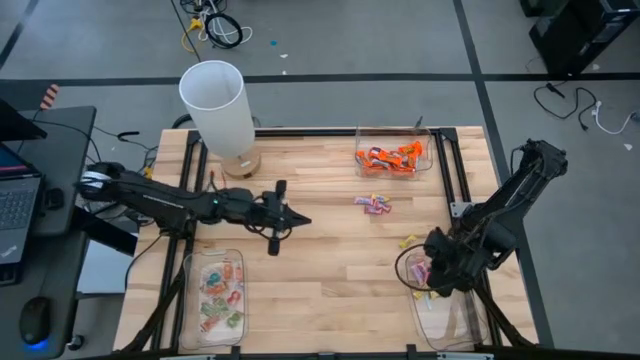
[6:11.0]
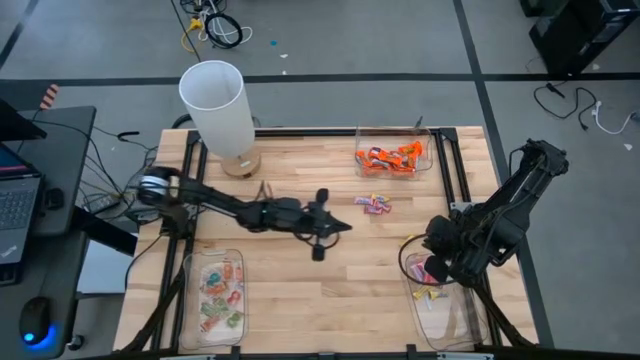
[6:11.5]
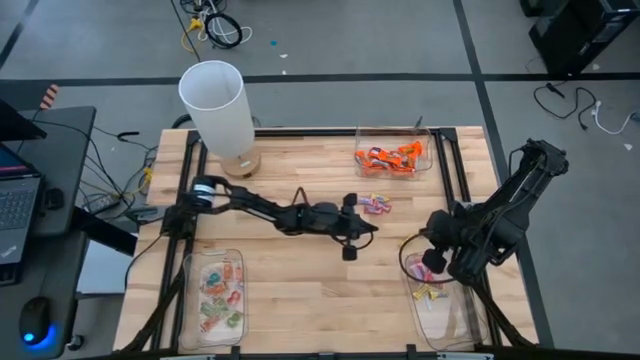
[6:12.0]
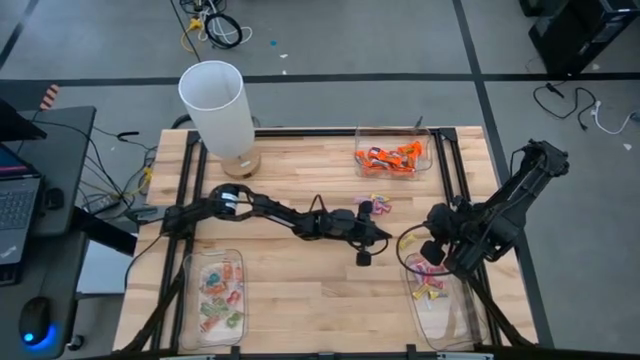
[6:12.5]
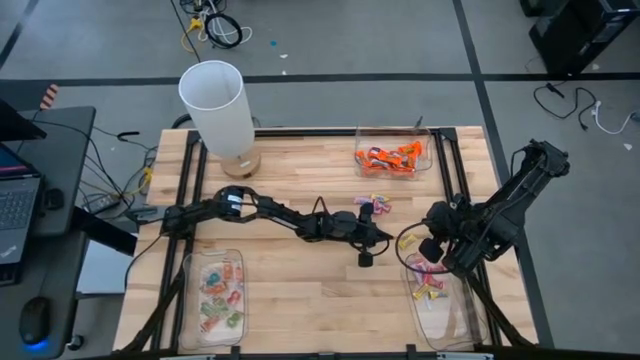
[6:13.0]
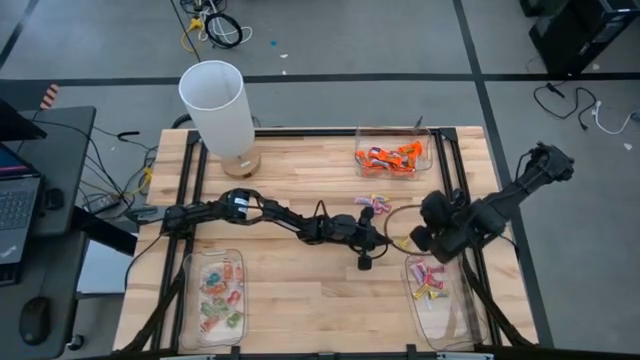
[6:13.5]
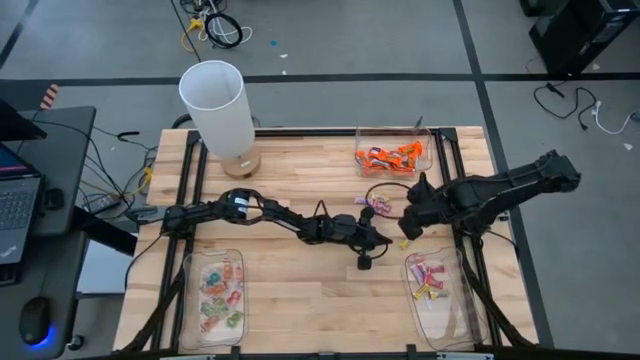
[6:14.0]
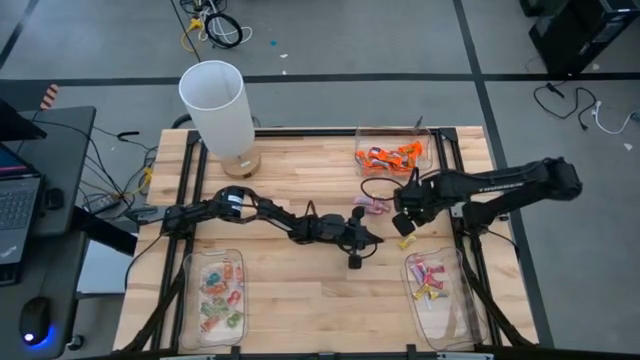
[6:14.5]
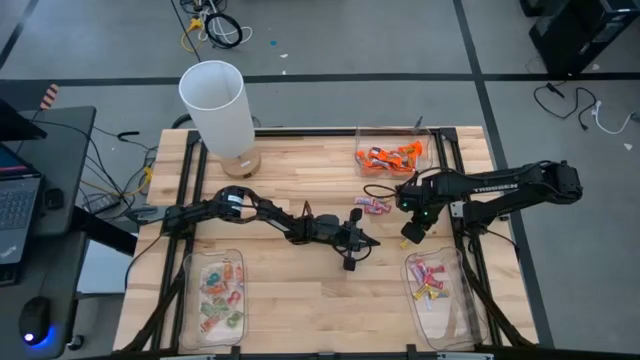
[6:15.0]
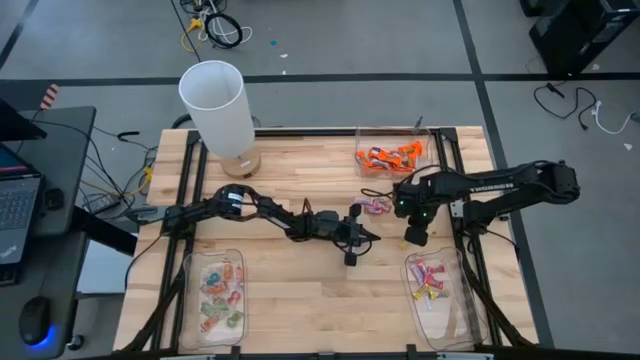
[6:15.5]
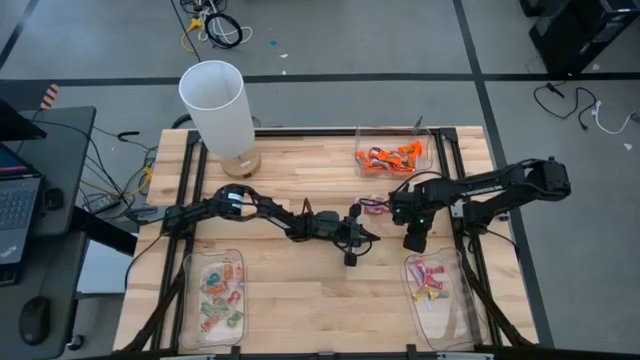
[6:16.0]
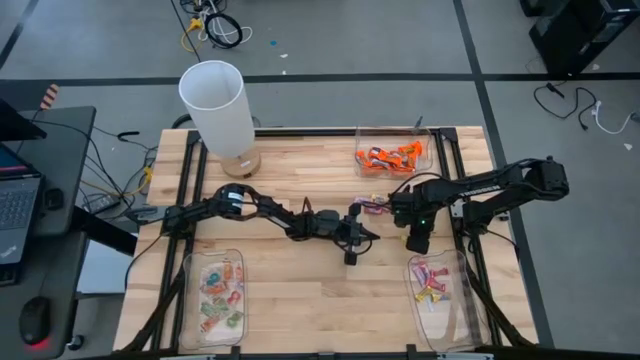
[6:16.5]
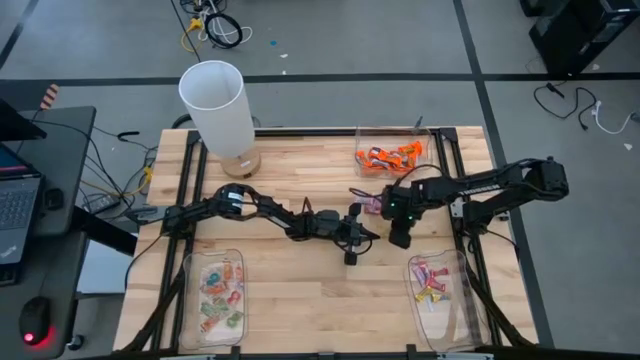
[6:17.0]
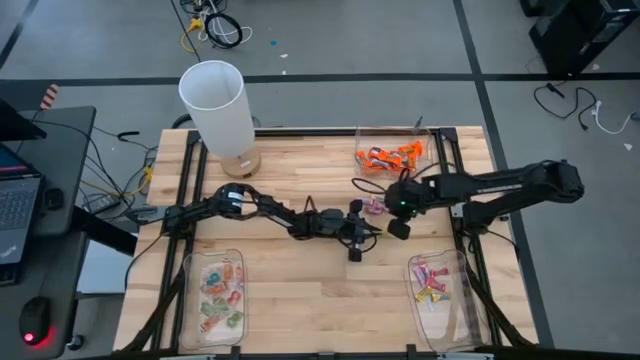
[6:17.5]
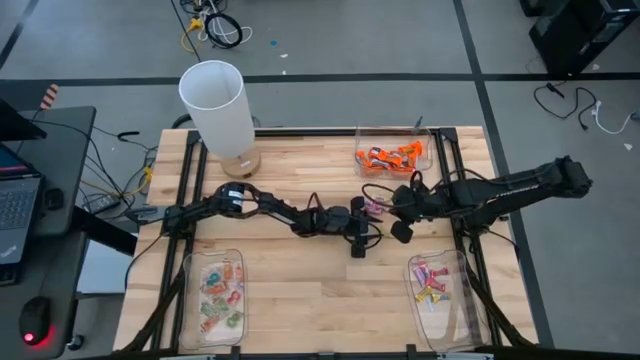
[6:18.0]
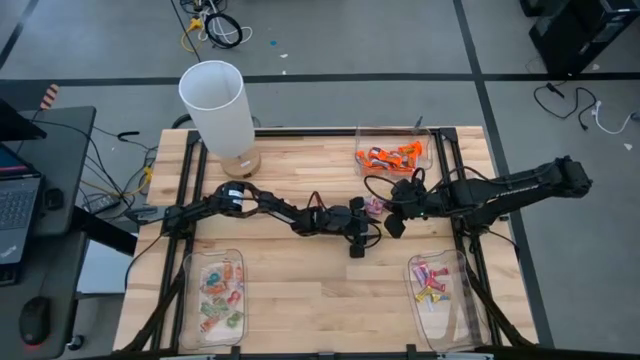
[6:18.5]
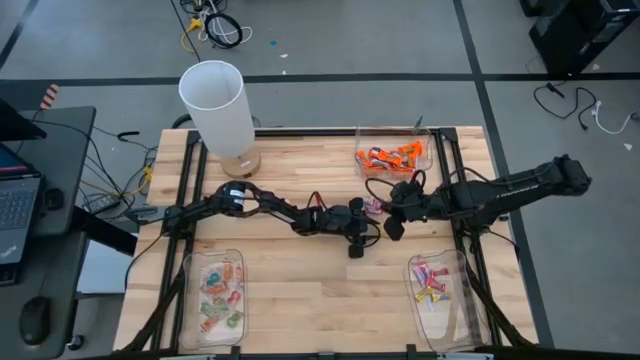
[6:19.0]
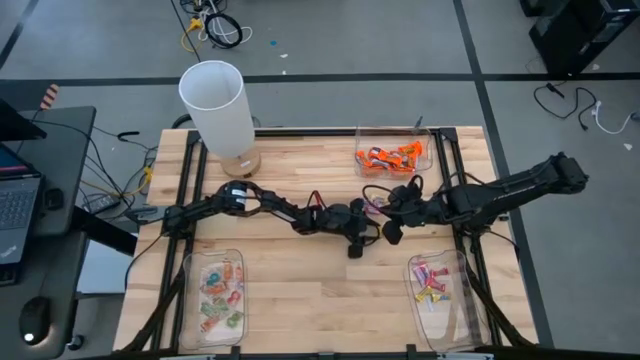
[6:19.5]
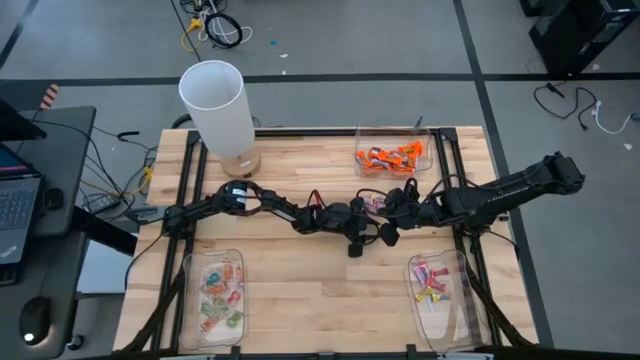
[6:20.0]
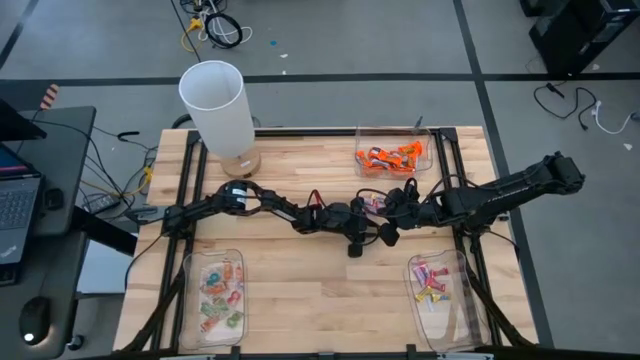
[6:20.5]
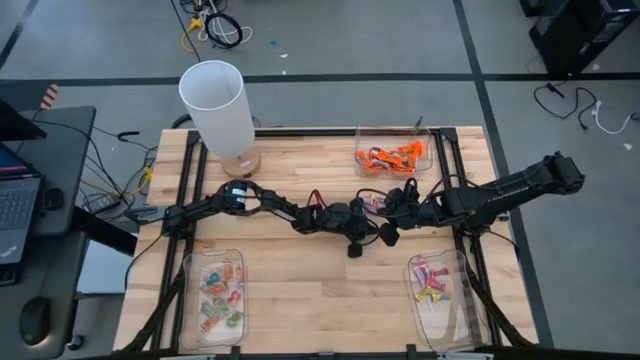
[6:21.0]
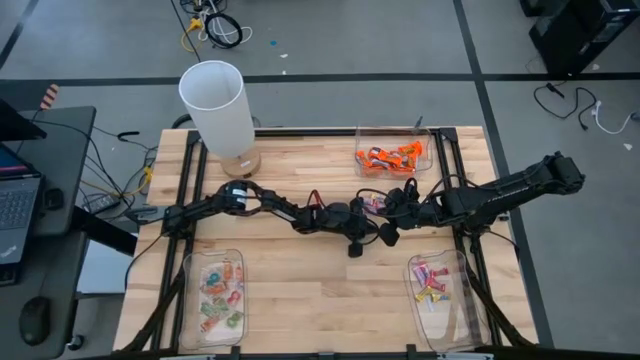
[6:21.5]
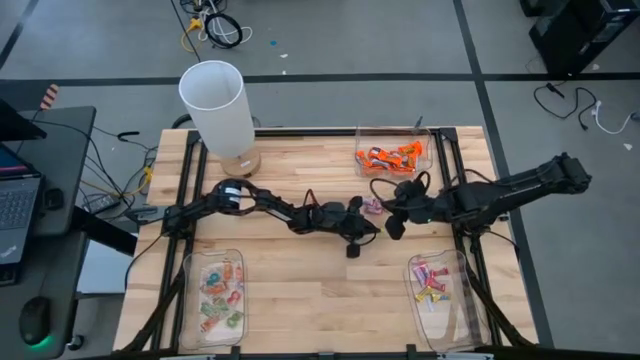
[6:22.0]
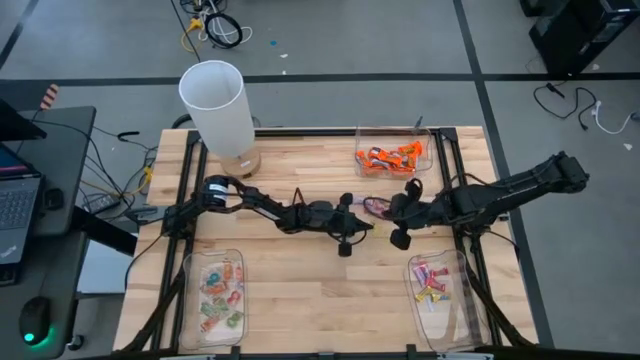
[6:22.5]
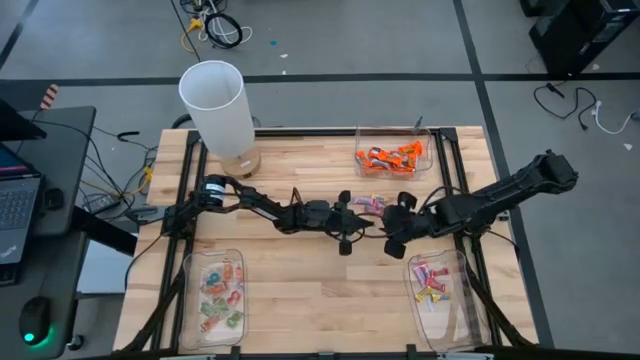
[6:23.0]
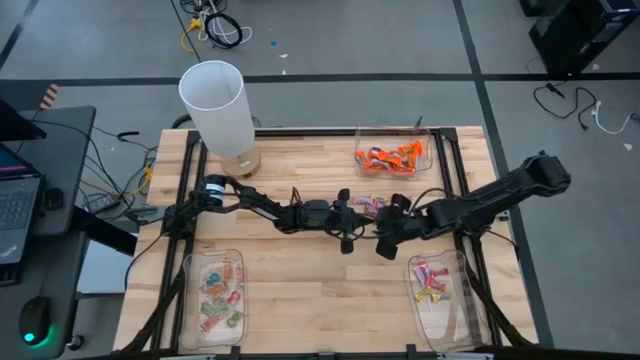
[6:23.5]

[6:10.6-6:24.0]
Task: Sort candy
Put the yellow candy into the bottom right transparent bin

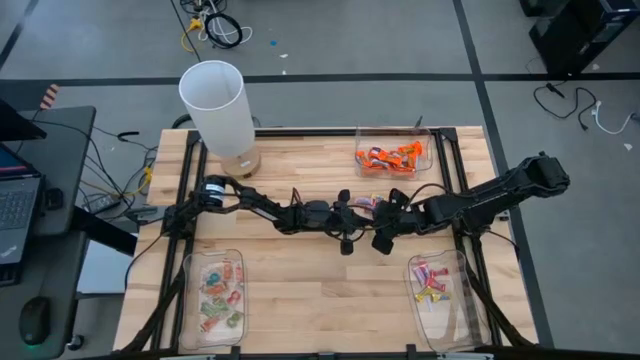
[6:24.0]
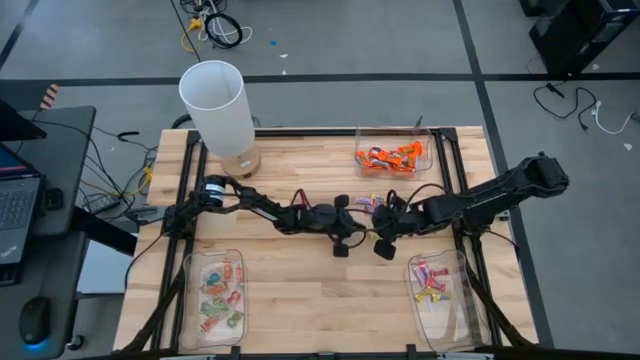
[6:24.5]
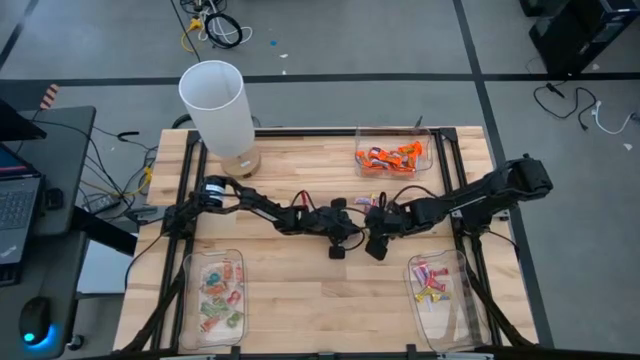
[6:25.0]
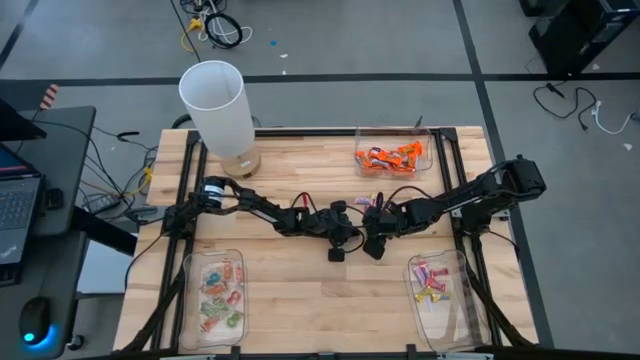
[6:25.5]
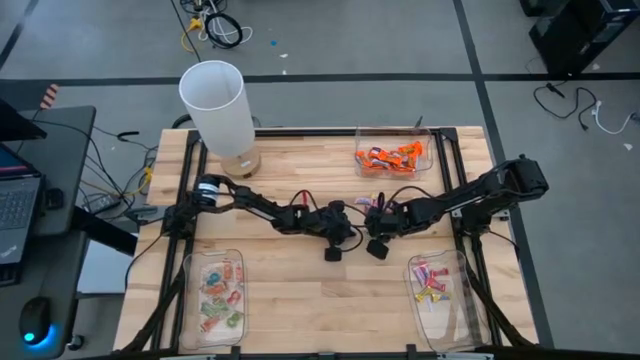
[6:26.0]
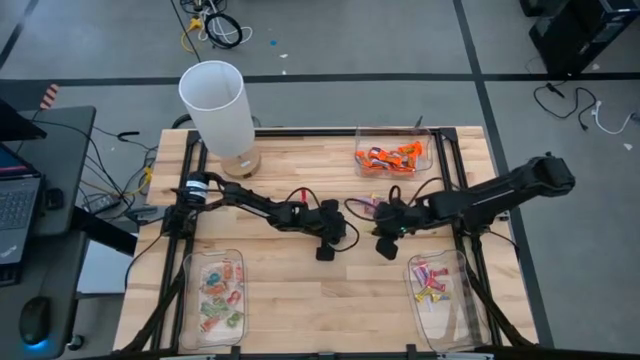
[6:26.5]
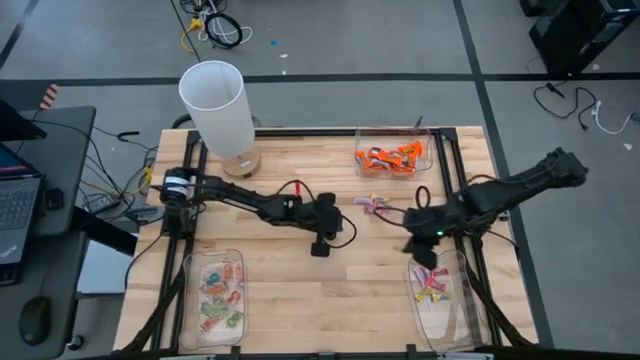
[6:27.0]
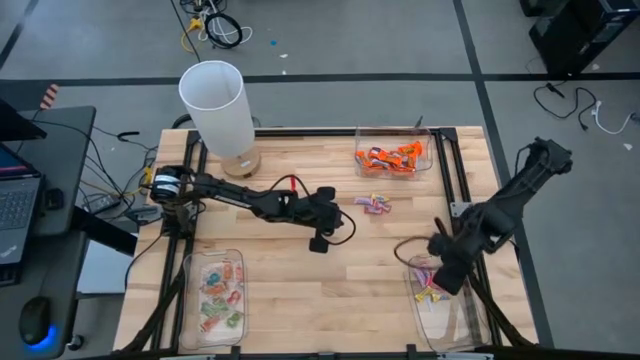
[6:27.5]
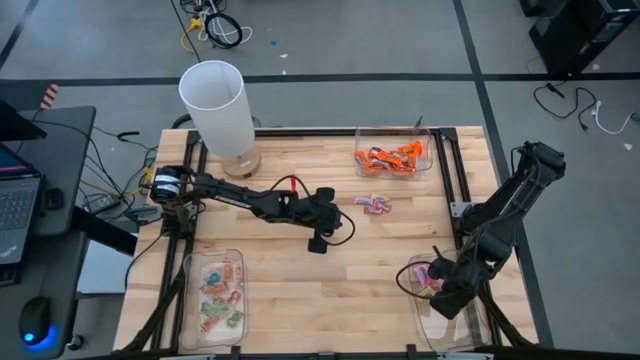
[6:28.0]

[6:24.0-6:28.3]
Put the yellow candy into the bottom right transparent bin

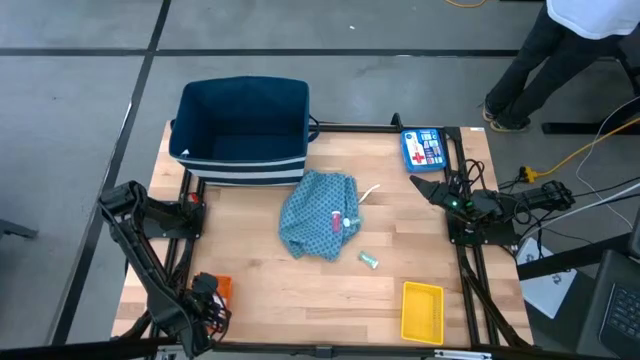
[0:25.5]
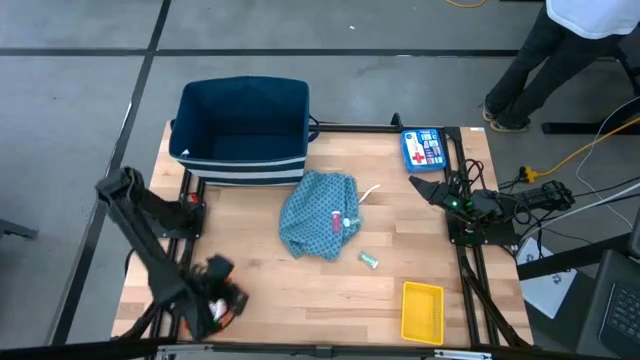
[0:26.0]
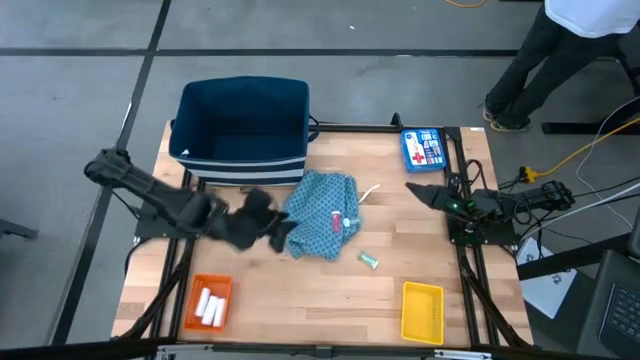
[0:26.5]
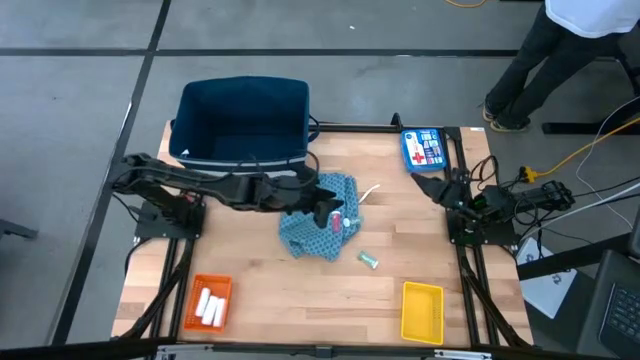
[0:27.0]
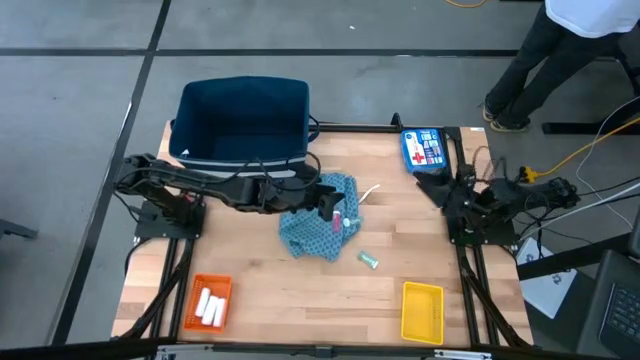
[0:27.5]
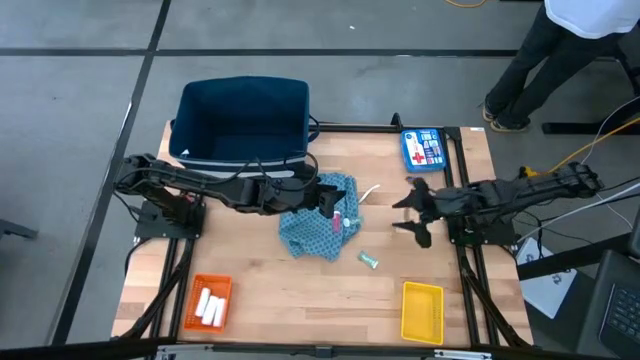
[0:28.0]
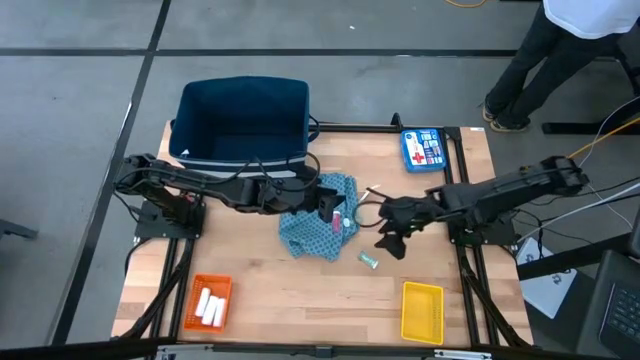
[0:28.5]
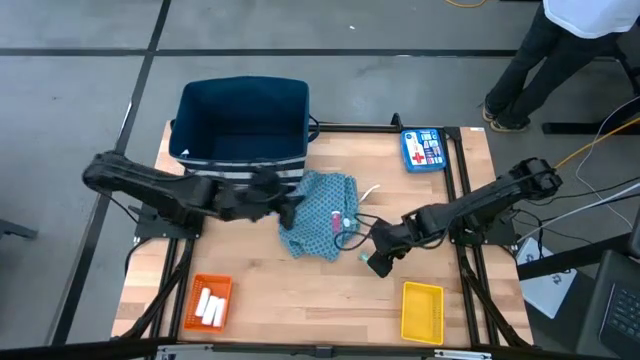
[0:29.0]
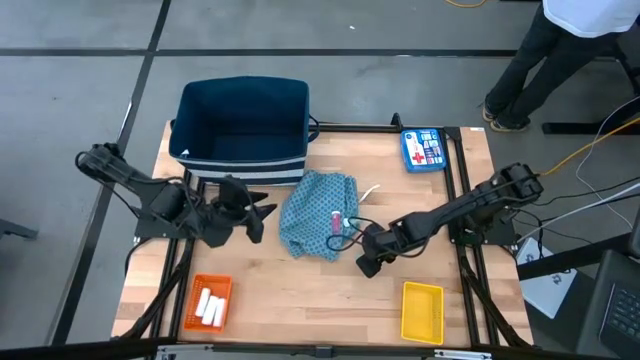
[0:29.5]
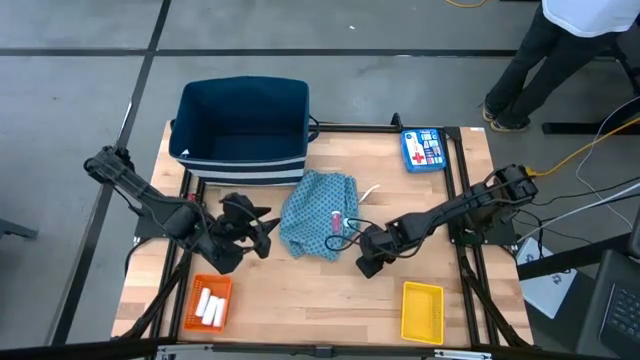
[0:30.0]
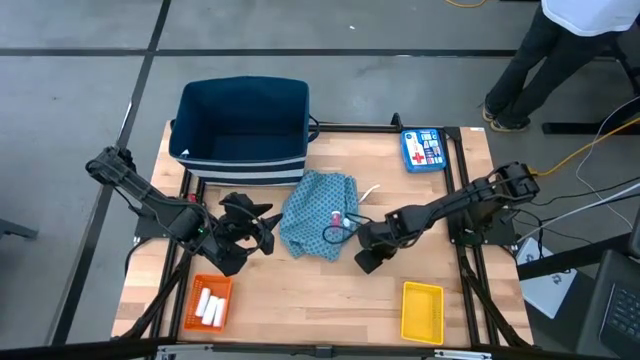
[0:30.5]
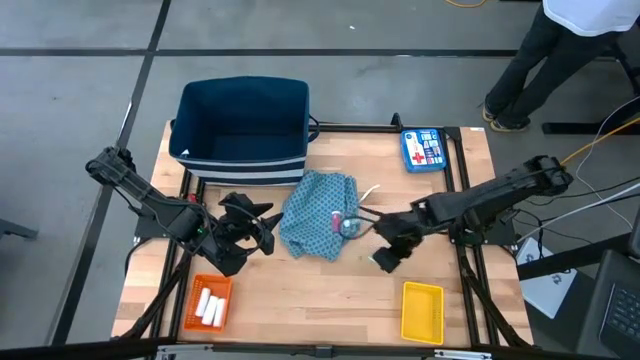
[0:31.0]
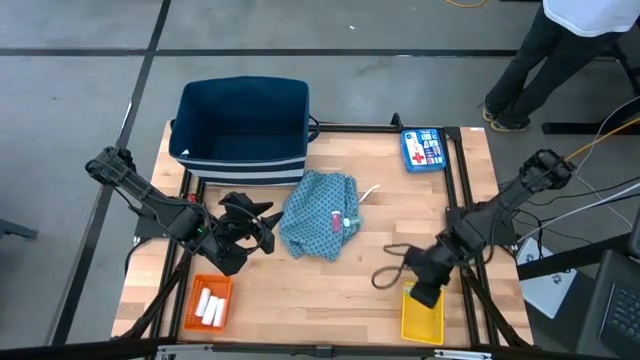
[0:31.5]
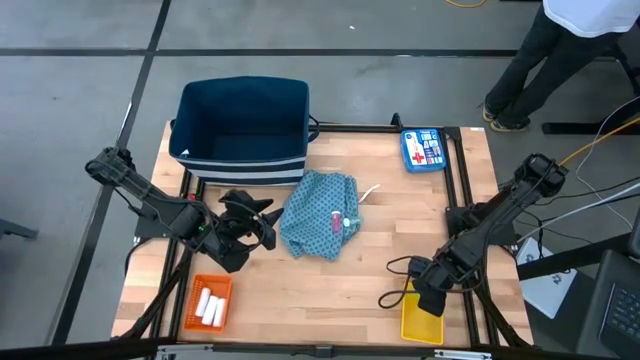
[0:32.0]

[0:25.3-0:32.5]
Task: Pick & Place Medicine items
Put the bottom green pill bottle into the yellow bin
